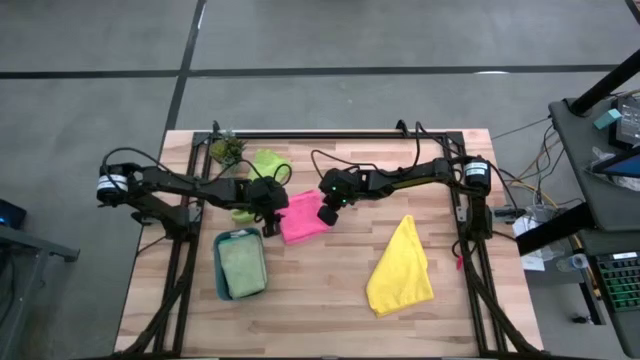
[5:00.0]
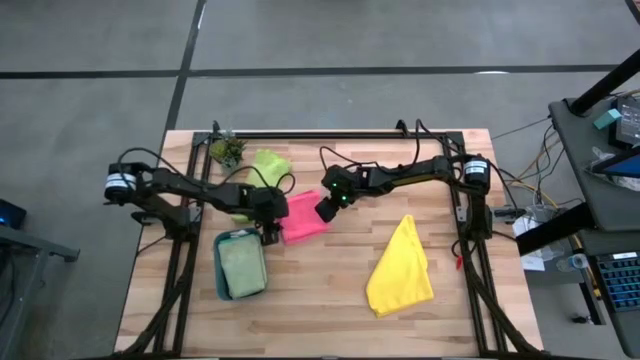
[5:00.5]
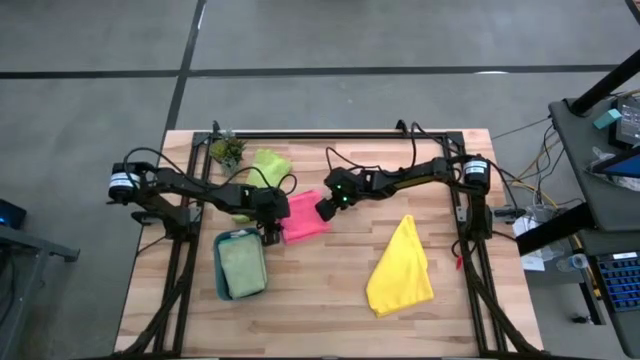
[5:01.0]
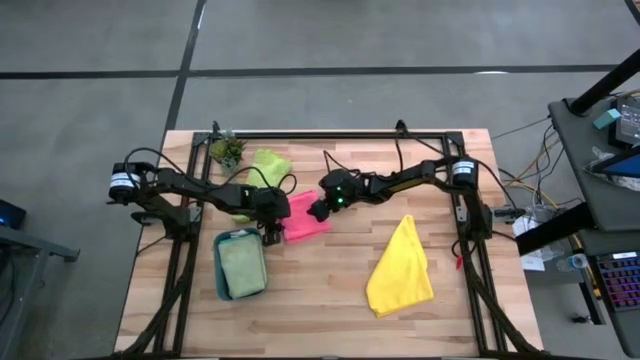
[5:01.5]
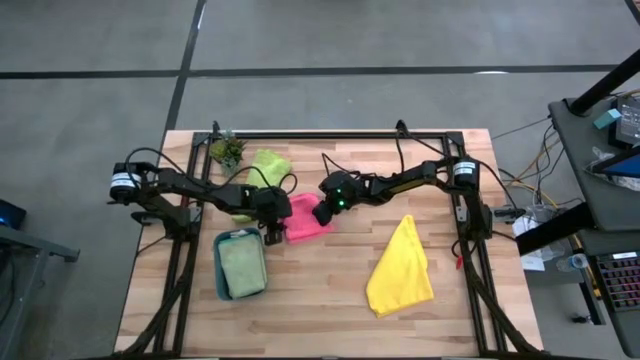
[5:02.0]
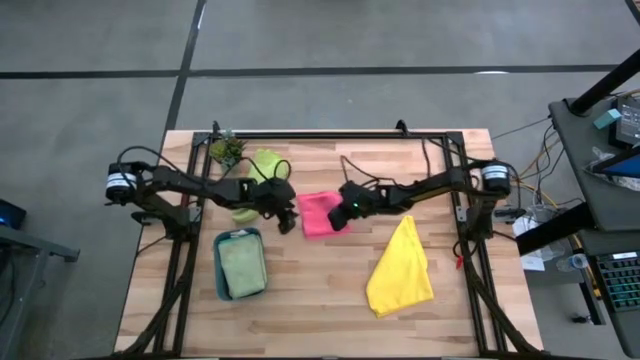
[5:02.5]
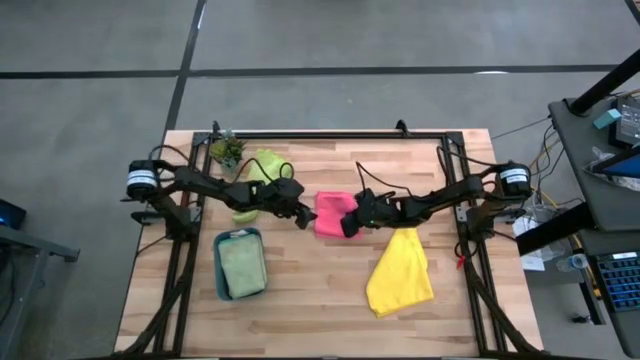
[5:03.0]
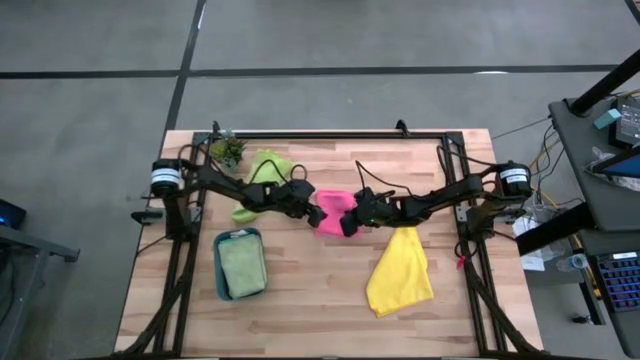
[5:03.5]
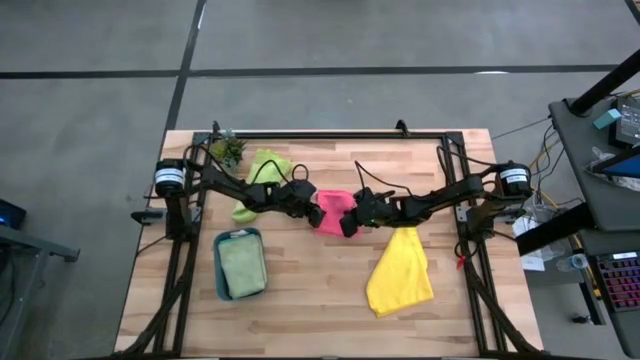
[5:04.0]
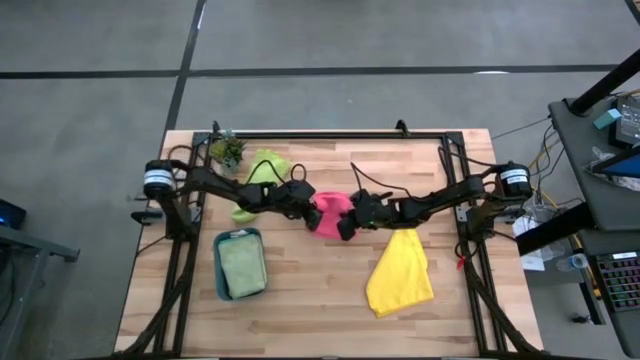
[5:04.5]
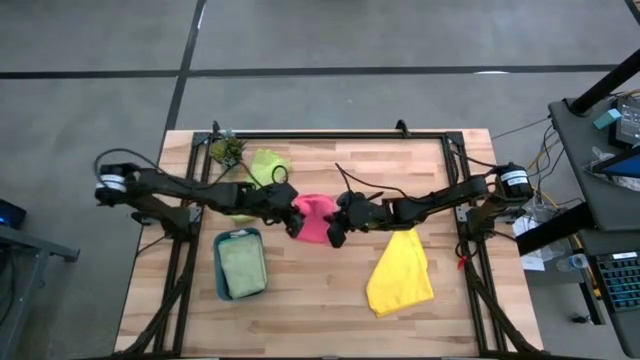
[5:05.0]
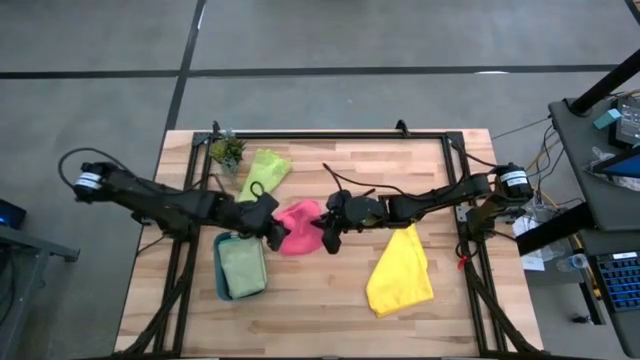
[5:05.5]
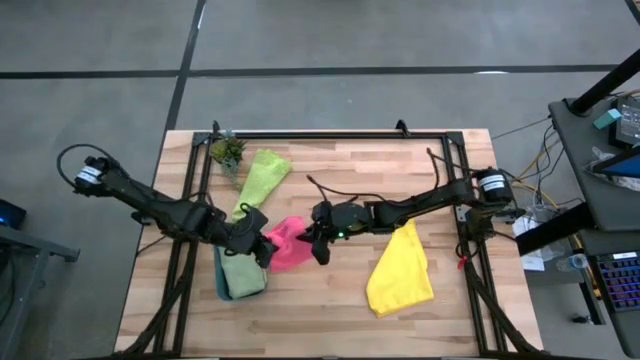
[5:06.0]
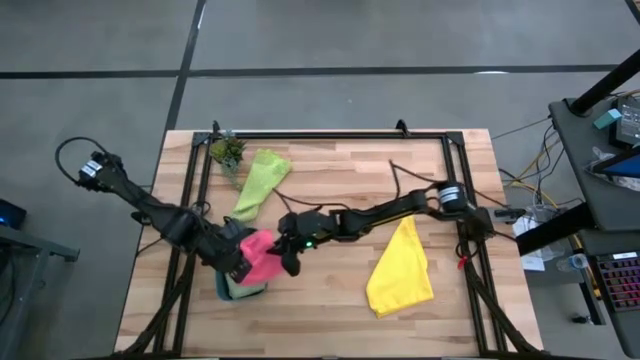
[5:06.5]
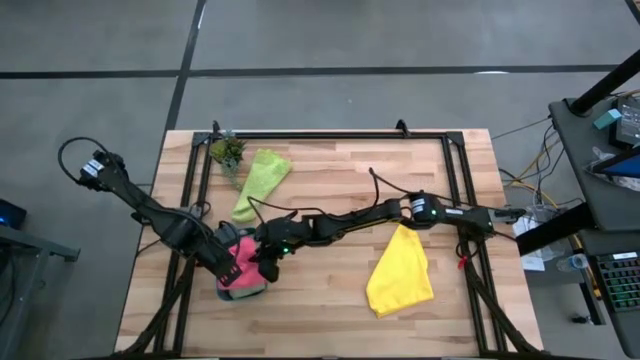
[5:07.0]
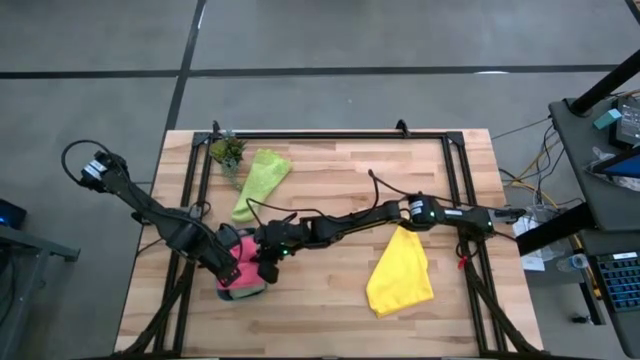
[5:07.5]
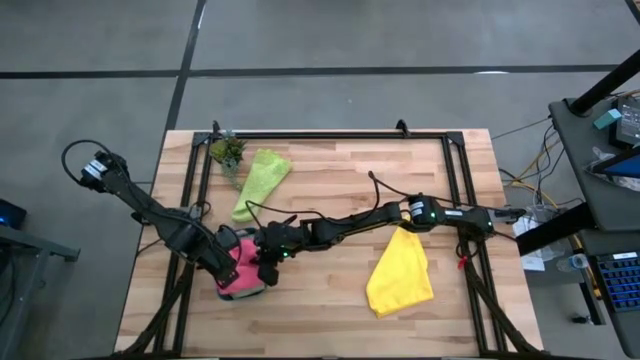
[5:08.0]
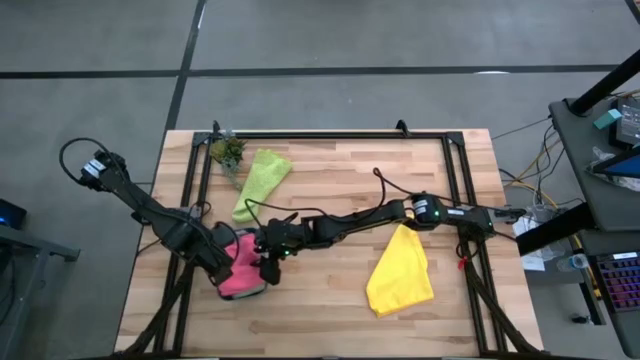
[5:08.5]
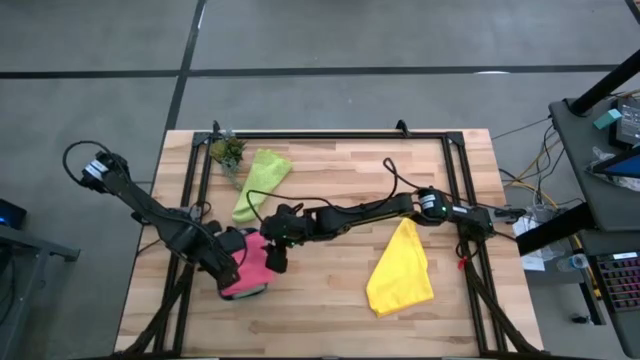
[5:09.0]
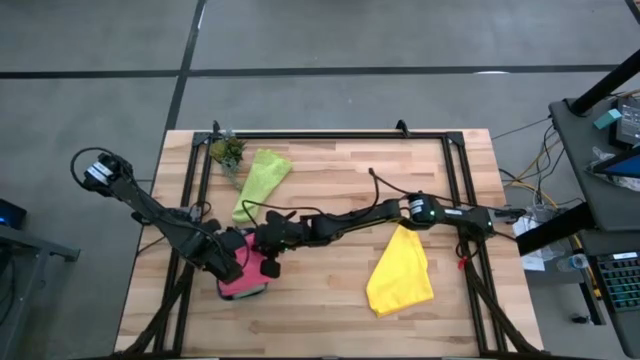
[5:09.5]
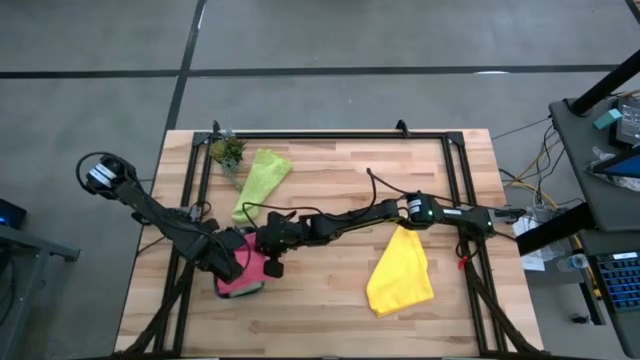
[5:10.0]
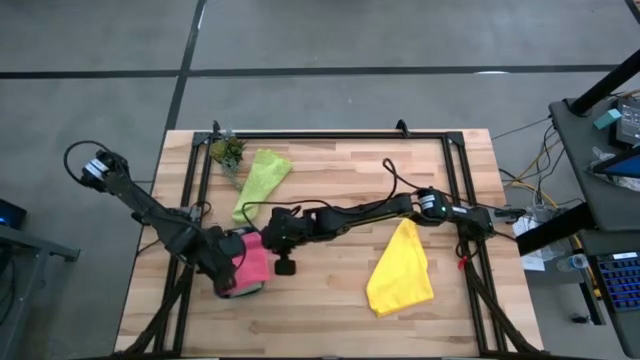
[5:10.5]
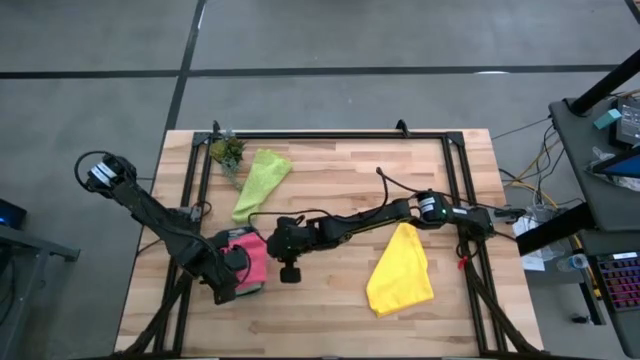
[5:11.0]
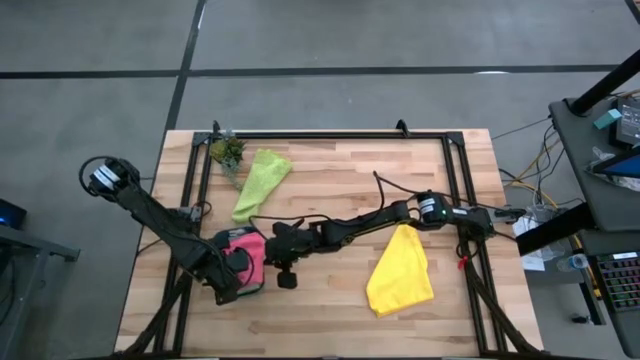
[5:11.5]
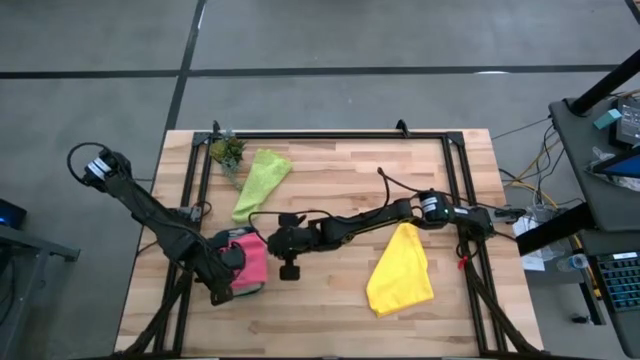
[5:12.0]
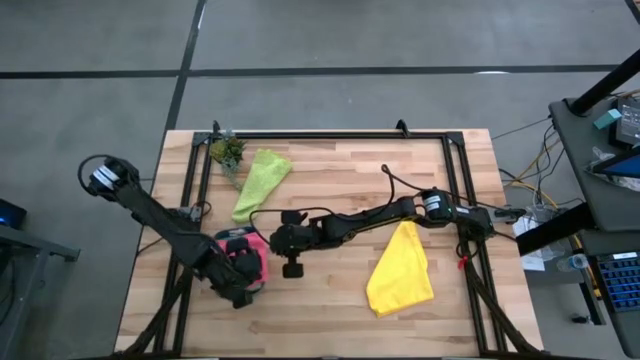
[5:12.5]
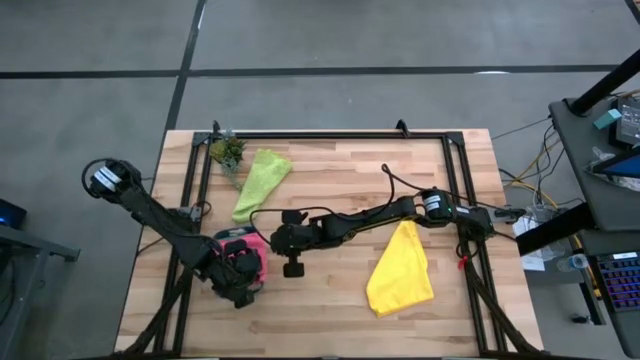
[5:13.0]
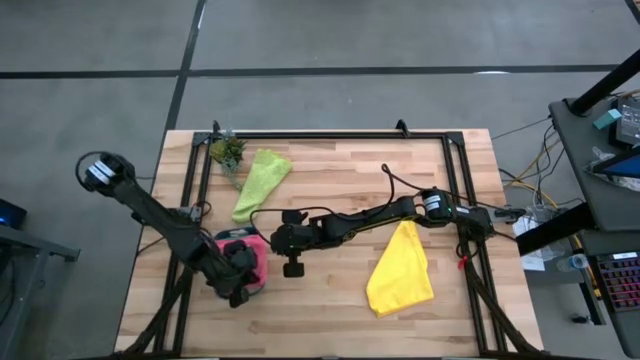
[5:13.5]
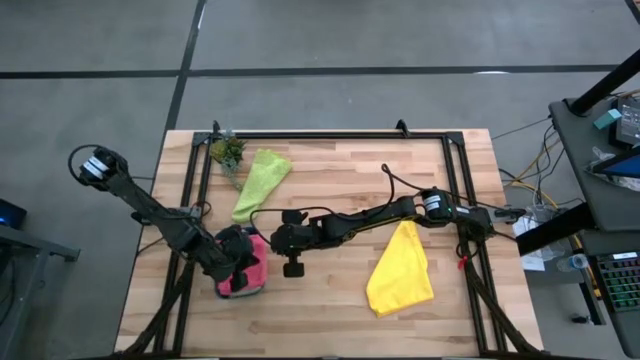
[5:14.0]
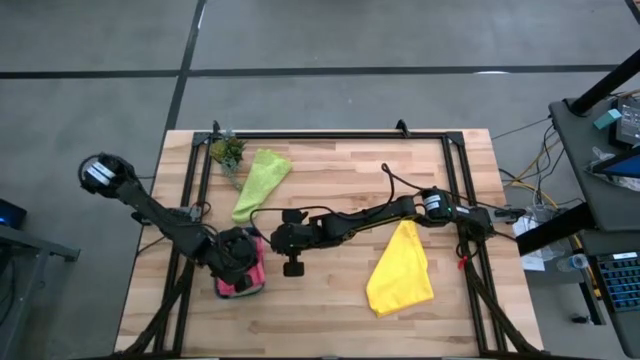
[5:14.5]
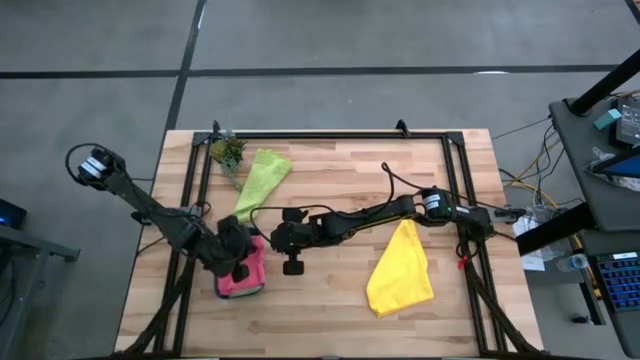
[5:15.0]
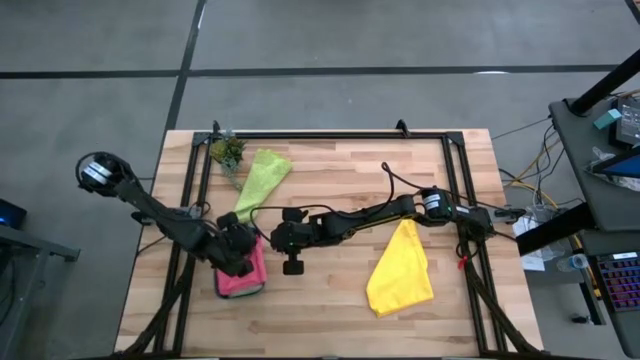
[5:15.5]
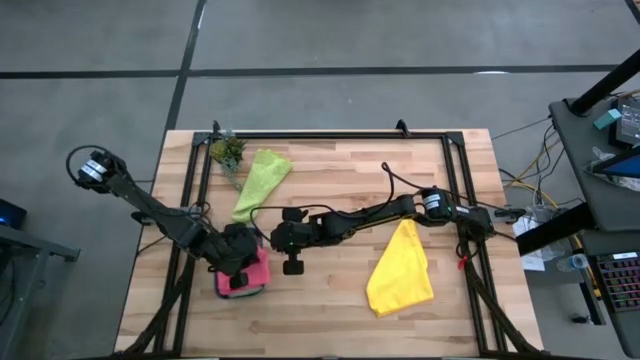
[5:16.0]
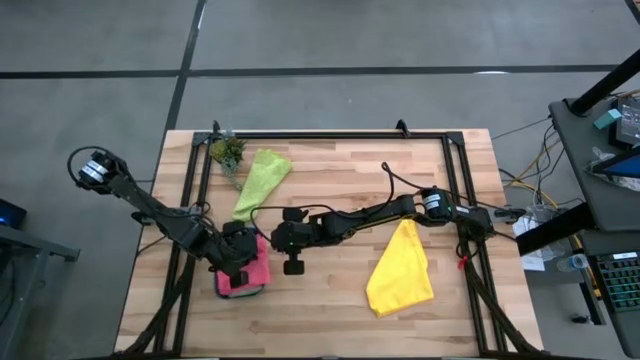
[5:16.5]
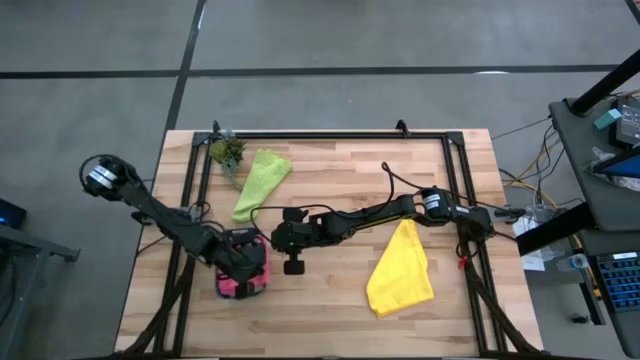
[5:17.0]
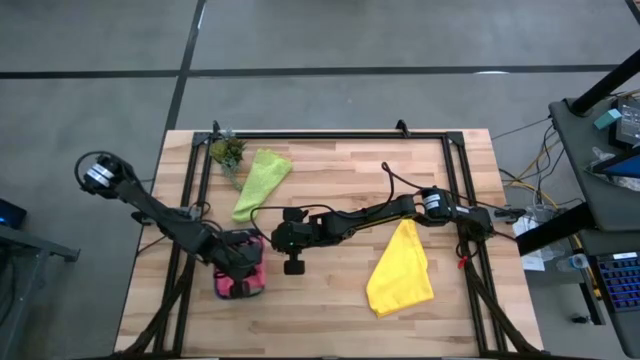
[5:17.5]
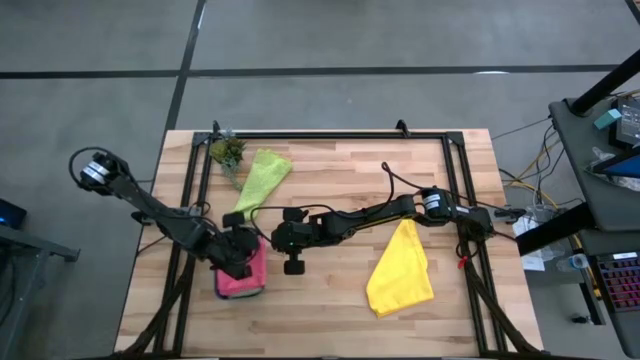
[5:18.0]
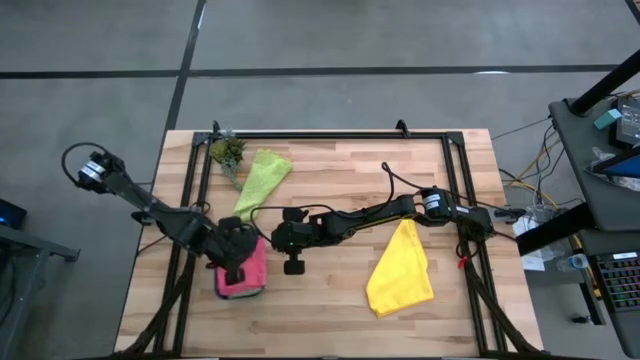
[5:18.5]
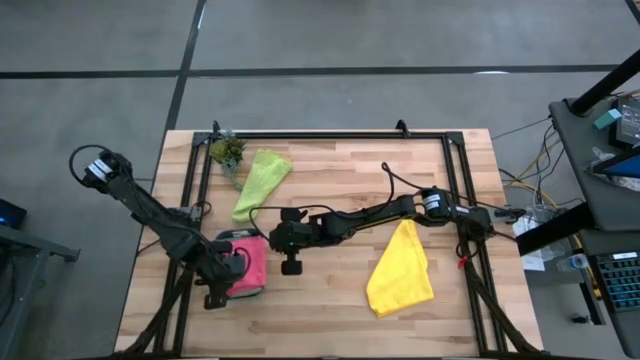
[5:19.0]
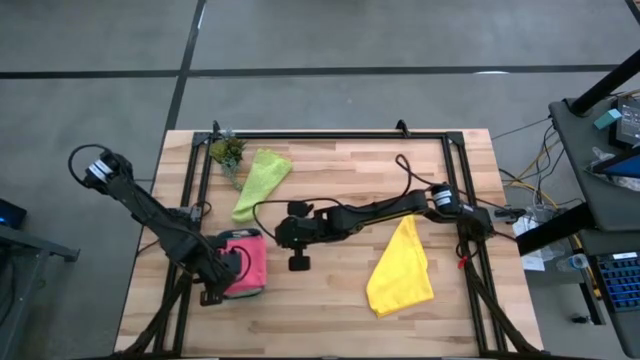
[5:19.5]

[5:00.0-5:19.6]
Task: Fold microfiber towels
Put the pink microfiber cloth into the blue bin

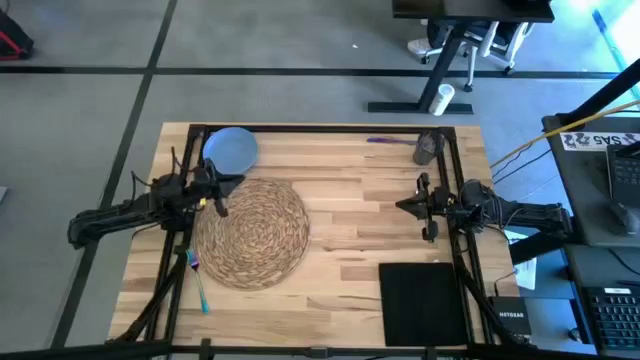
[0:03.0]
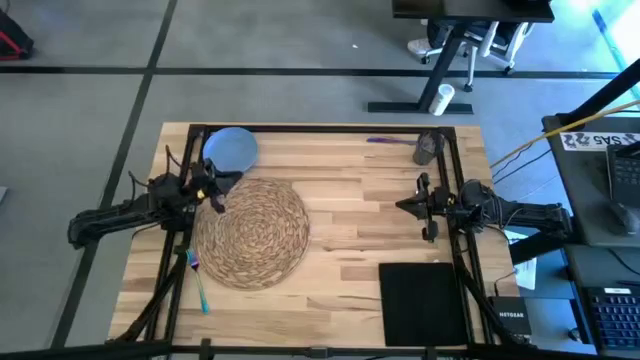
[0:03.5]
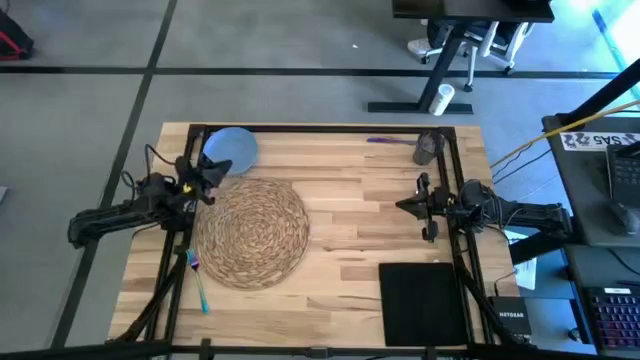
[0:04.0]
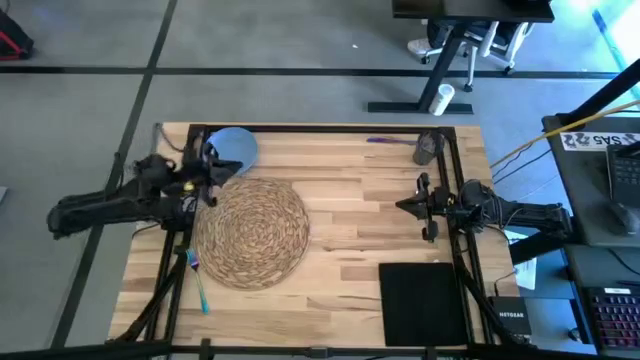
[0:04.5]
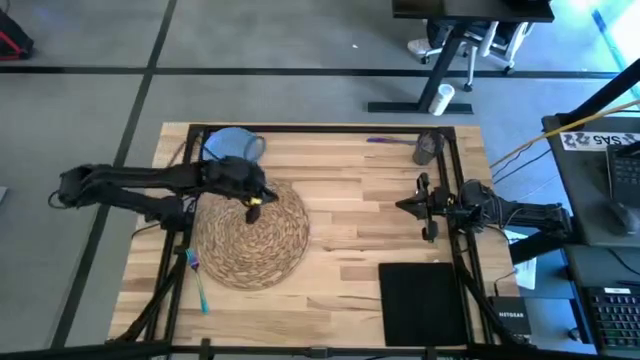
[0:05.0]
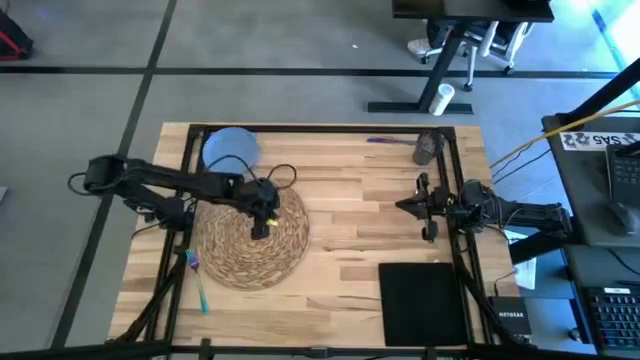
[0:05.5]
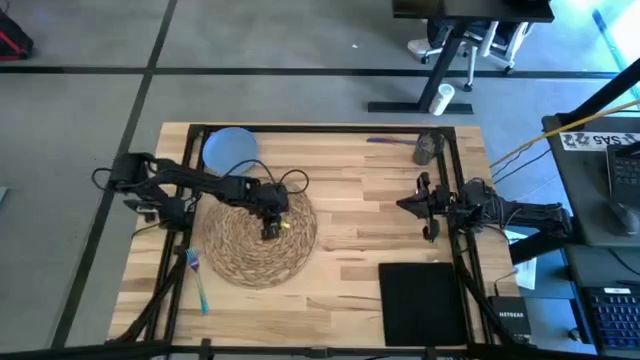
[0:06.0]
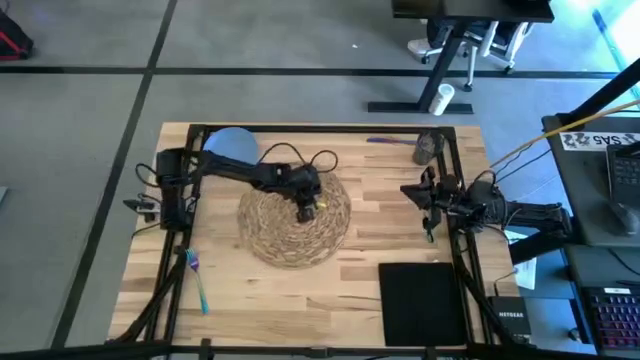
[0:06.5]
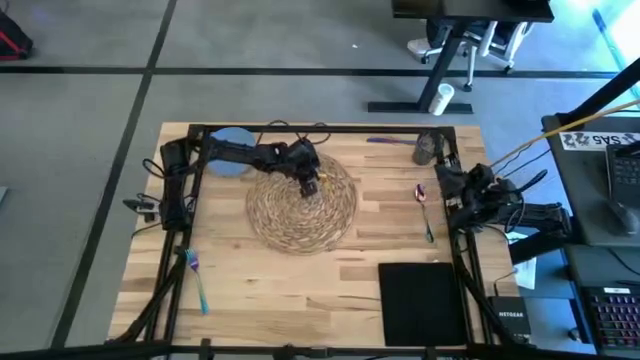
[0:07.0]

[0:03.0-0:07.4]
Task: Set table place
Move the brown placemat on the top center of the table
